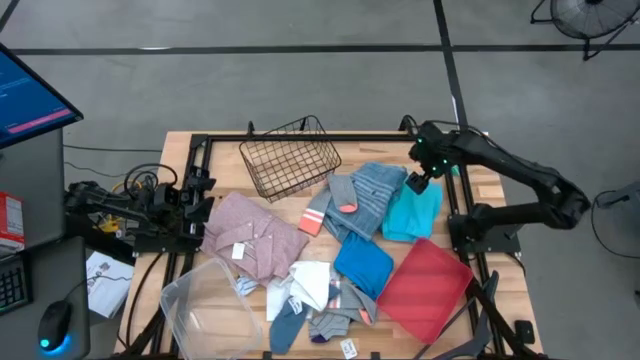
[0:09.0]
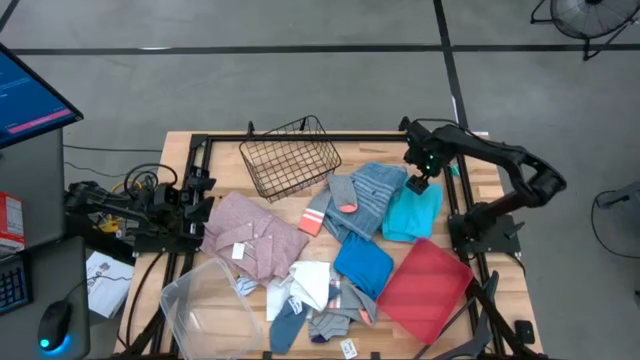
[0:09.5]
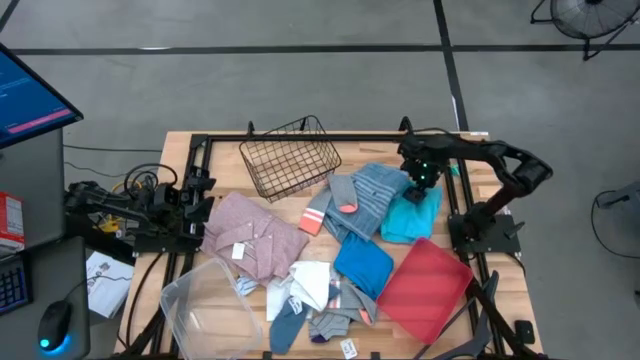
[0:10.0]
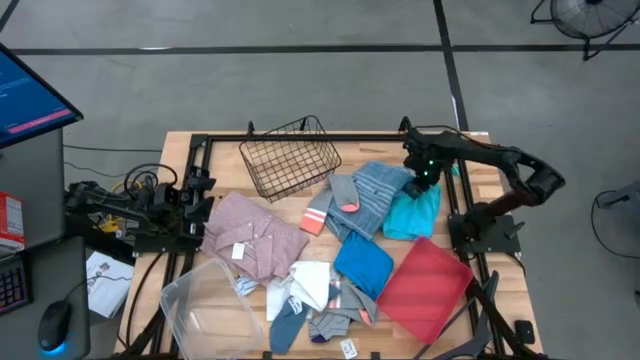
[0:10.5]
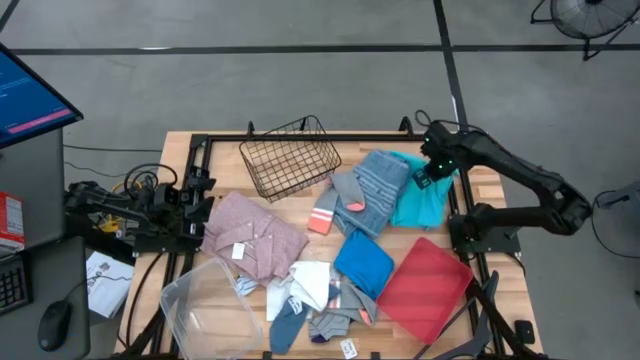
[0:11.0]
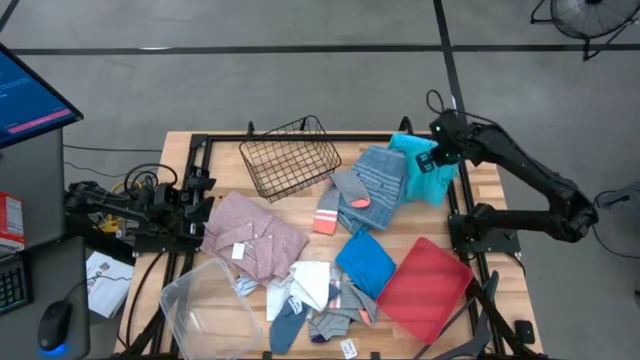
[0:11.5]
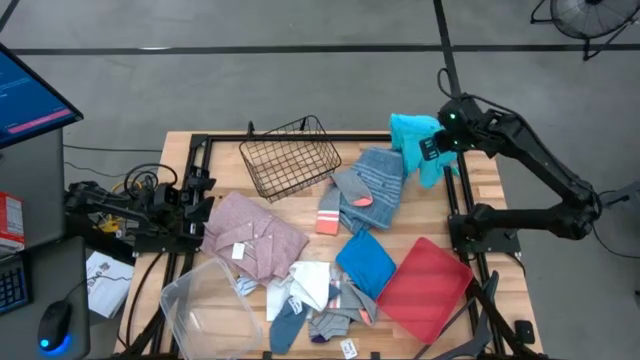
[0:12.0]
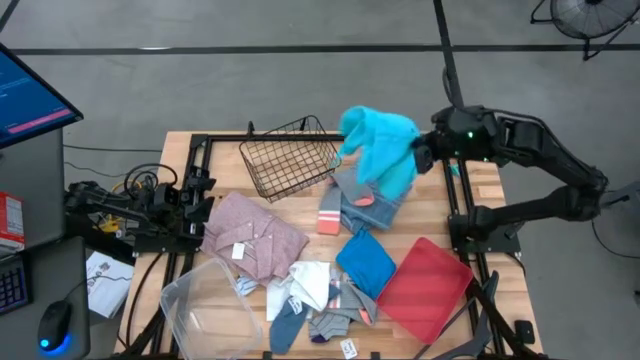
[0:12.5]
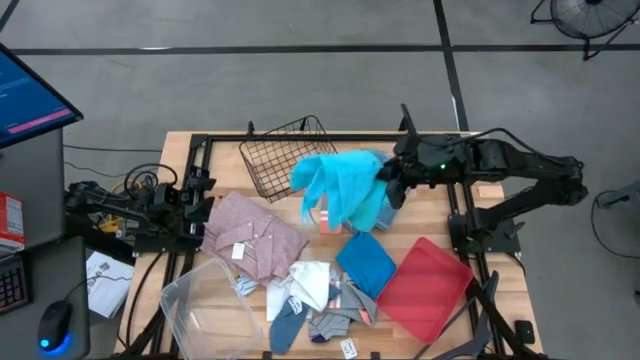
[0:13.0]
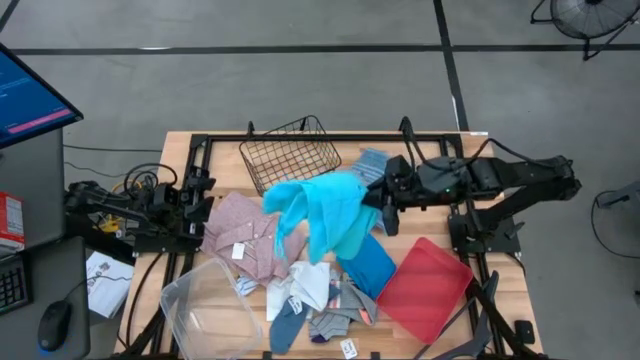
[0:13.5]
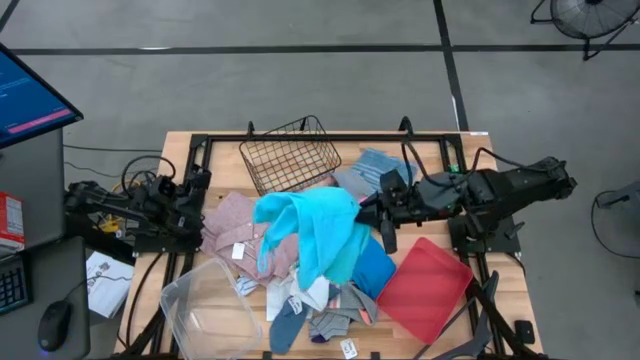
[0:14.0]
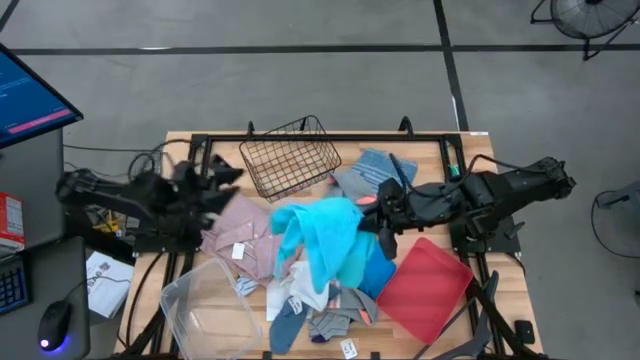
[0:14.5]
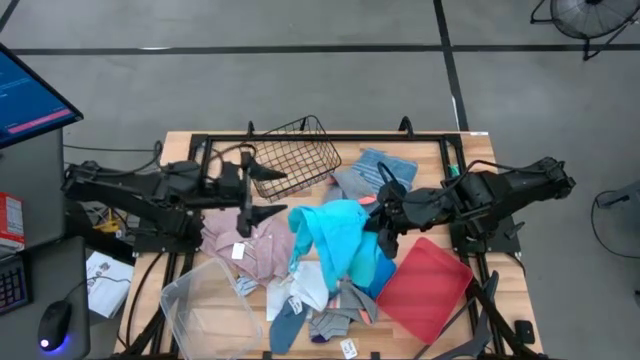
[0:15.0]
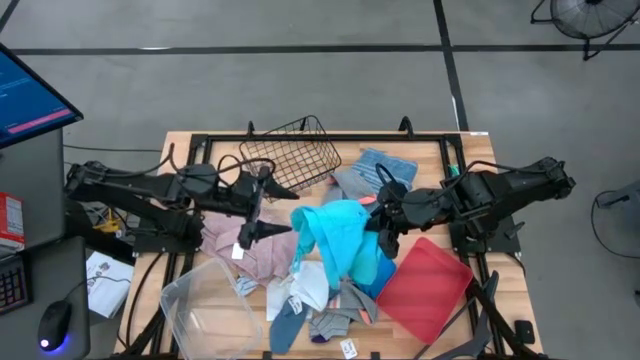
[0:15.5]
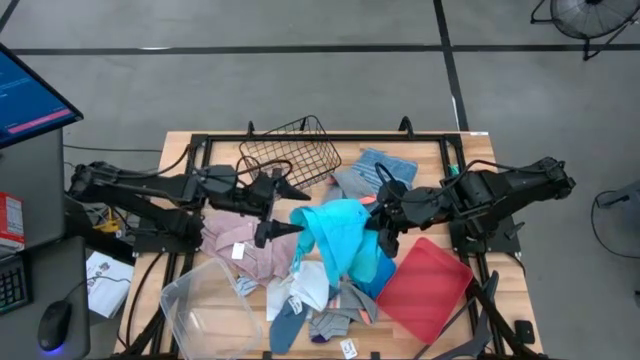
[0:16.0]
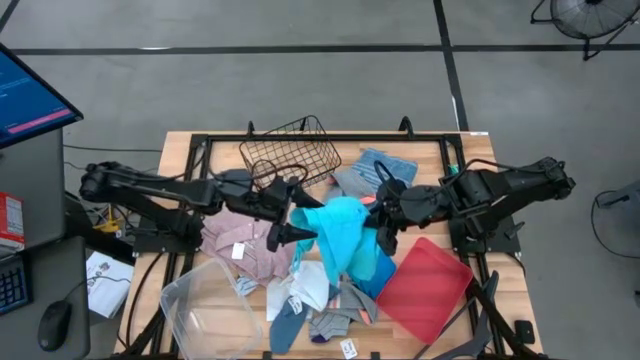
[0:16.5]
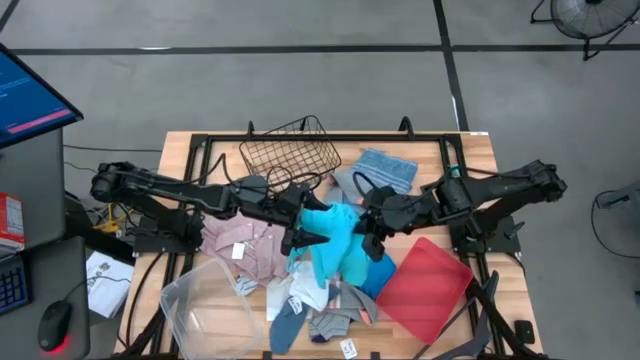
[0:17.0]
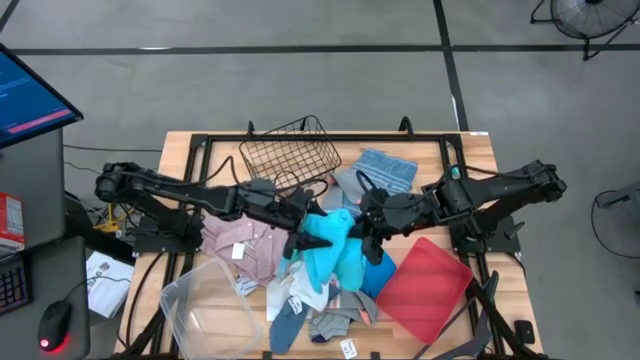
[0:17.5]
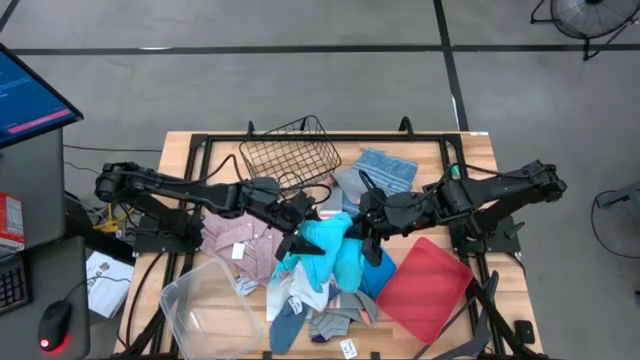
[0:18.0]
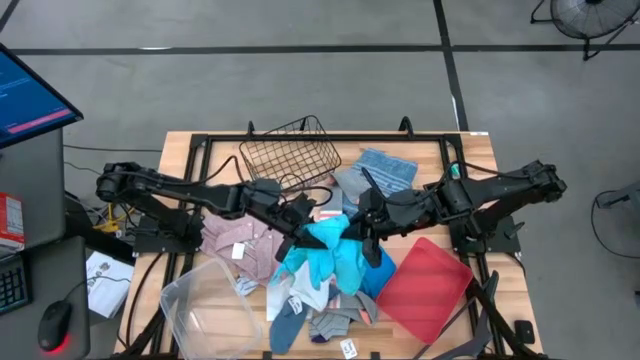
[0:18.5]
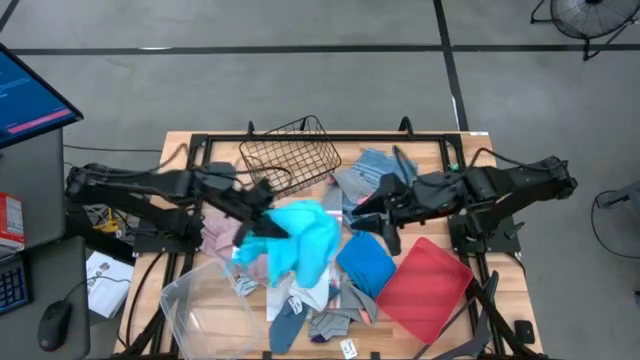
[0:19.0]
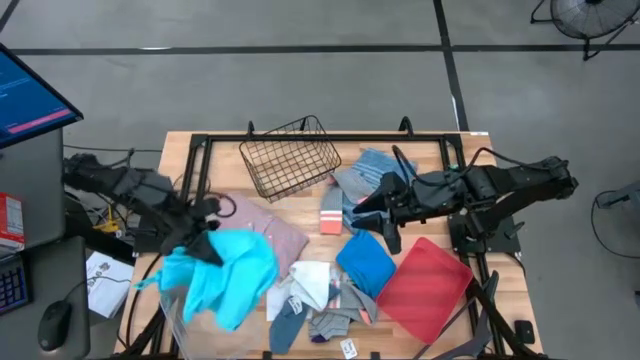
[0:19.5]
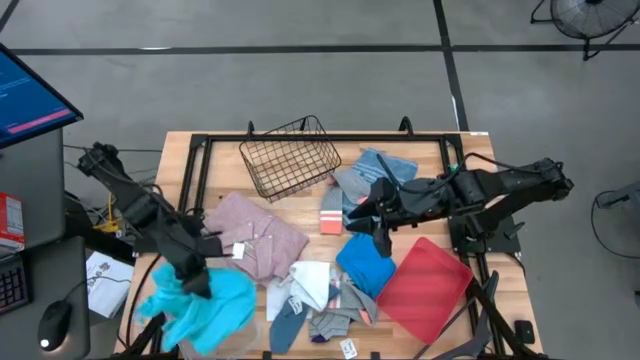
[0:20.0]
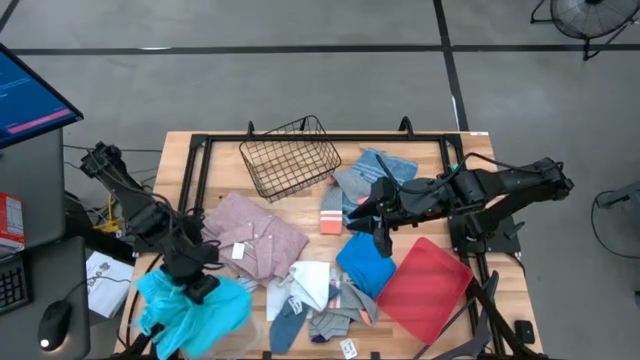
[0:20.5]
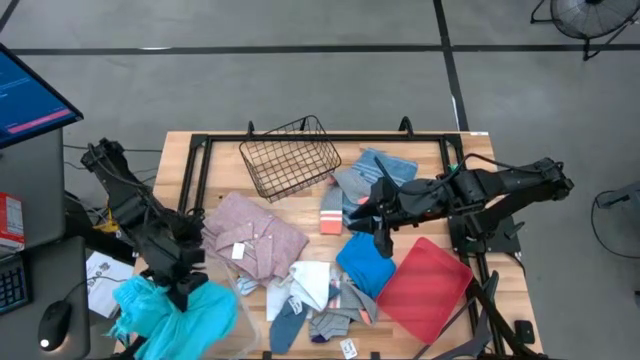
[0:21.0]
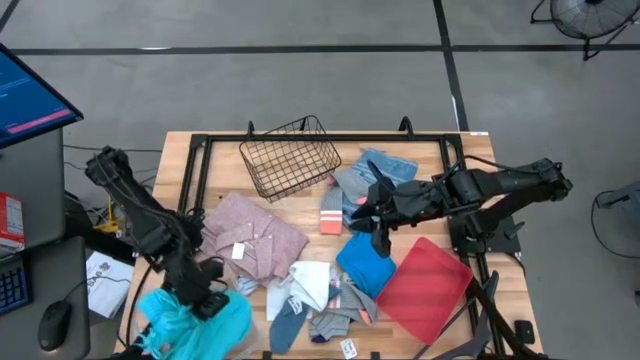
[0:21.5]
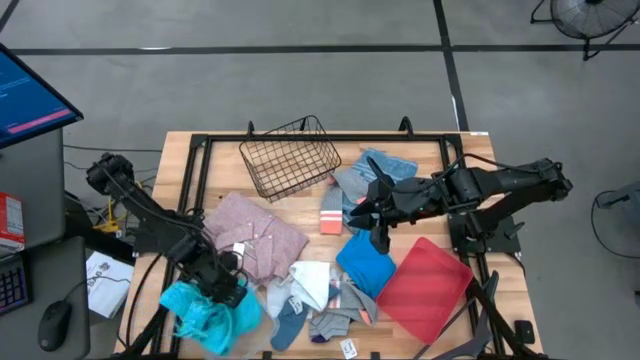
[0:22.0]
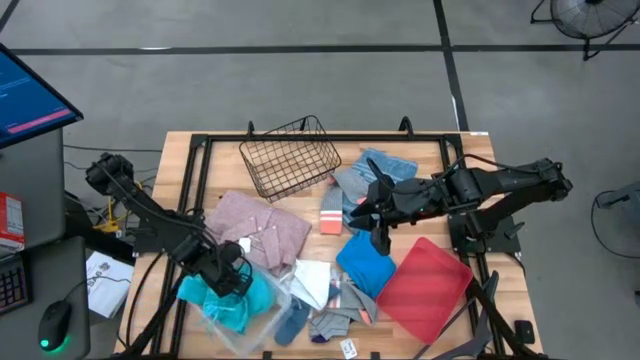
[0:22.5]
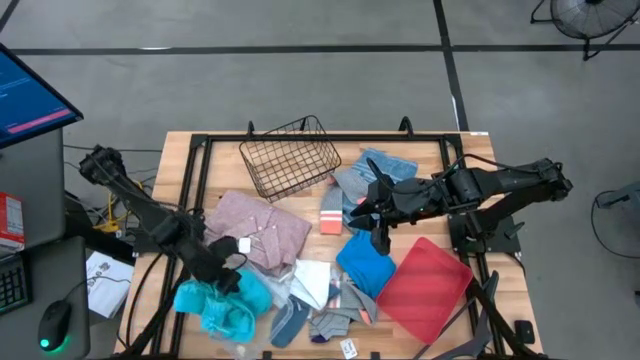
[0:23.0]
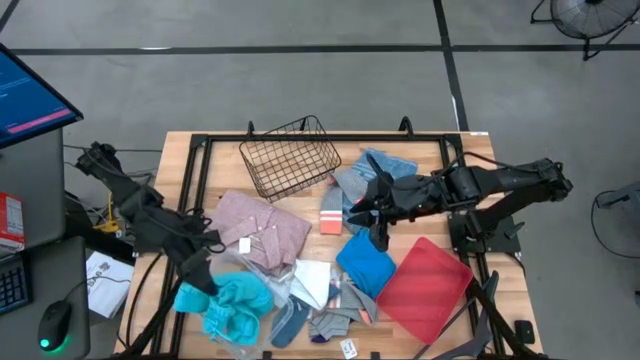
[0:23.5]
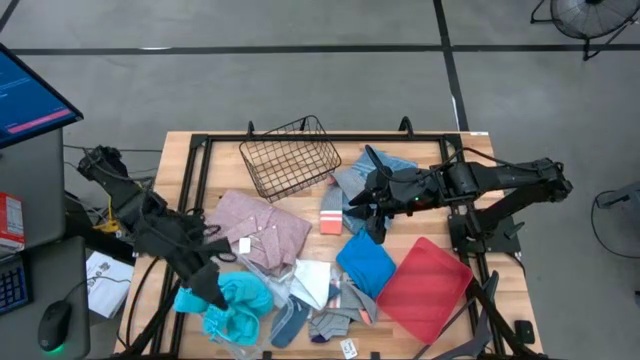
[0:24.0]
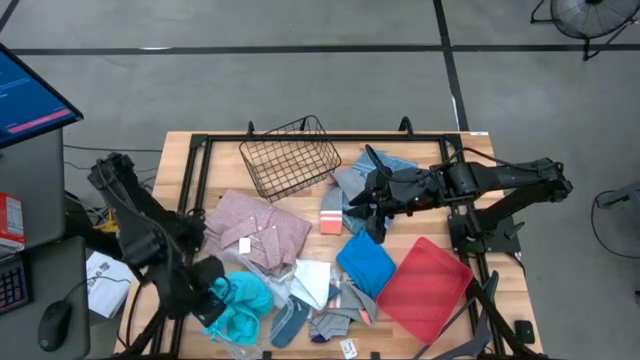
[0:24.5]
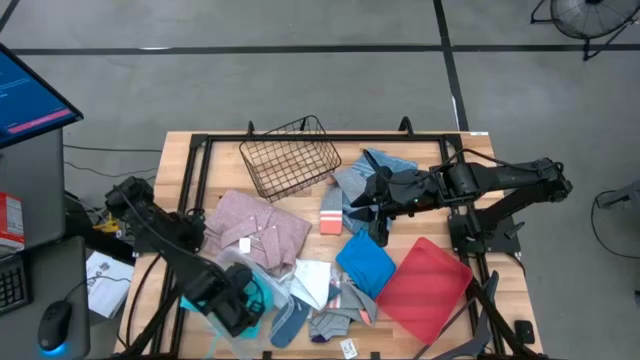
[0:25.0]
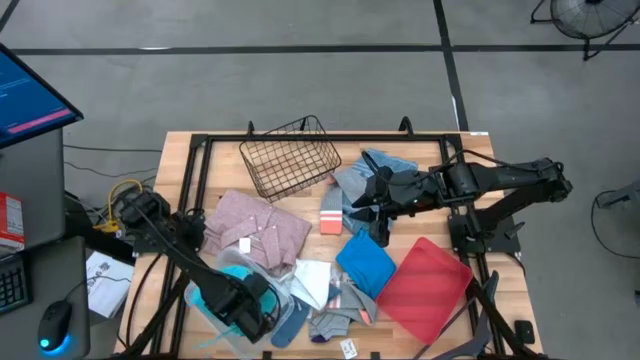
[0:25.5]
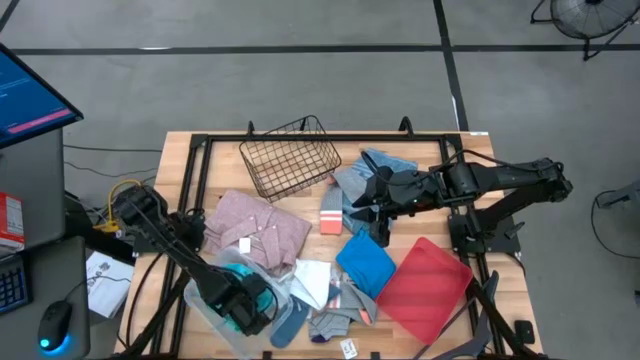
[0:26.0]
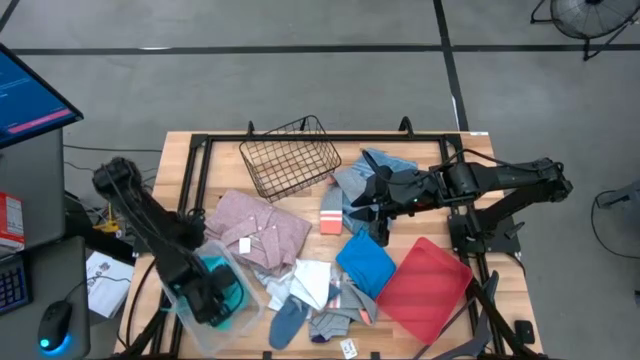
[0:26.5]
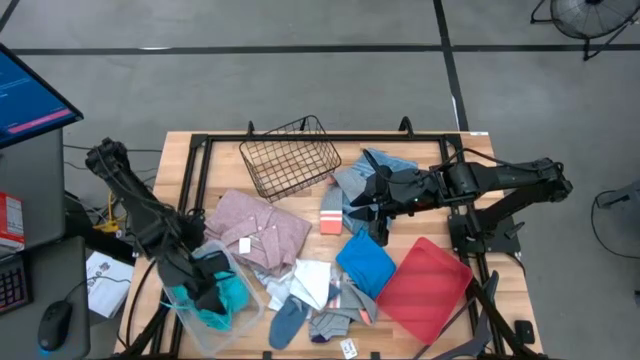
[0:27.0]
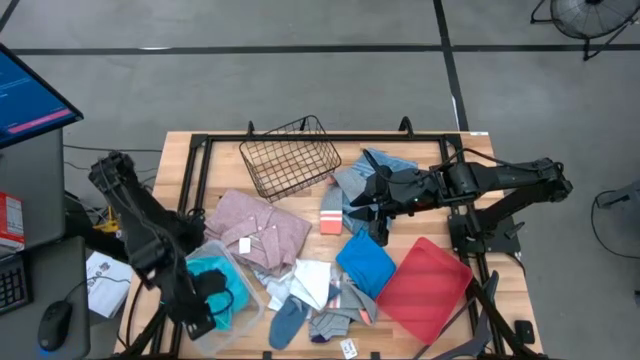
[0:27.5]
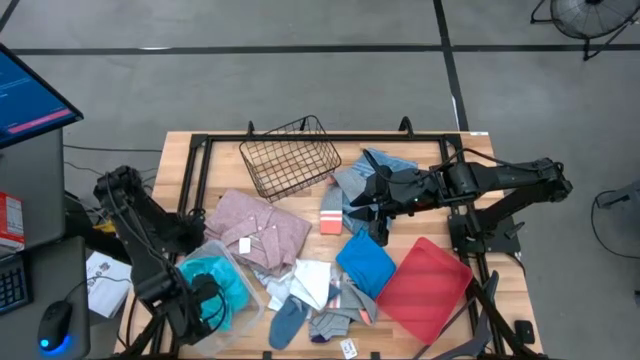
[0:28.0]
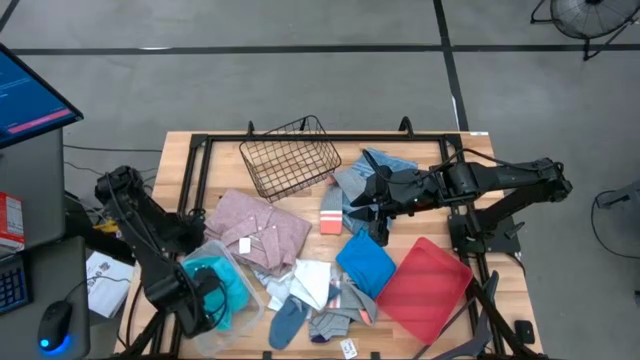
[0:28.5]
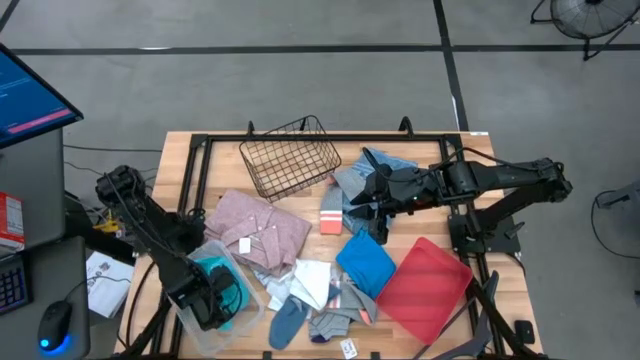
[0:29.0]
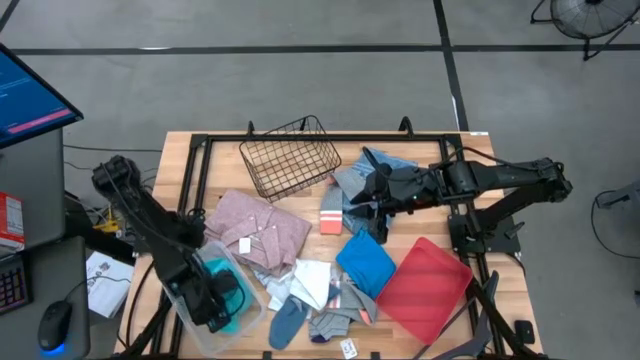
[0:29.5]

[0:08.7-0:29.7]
Task: Pick & Place Cloths
Put the light blue shorts into the transparent bin
